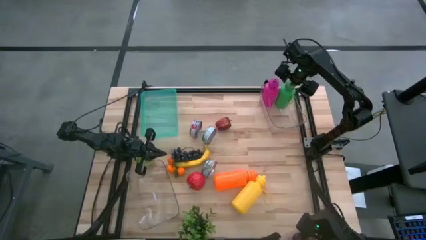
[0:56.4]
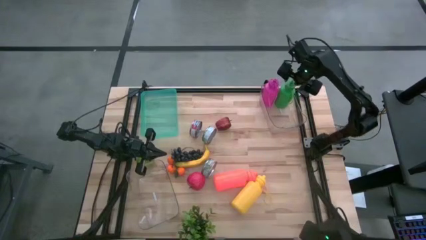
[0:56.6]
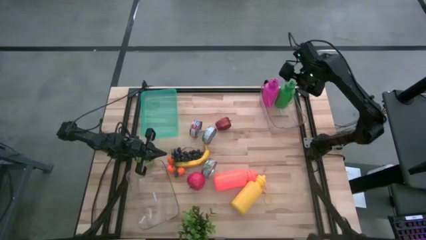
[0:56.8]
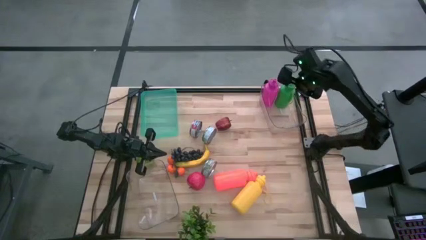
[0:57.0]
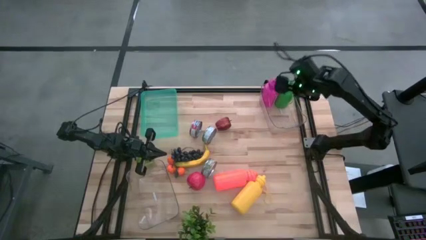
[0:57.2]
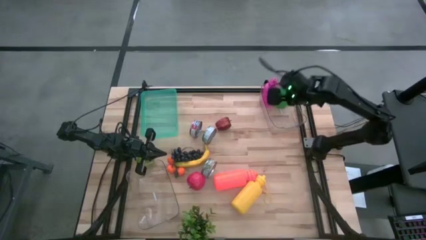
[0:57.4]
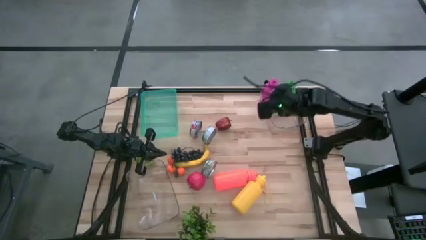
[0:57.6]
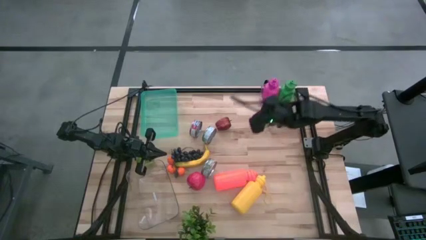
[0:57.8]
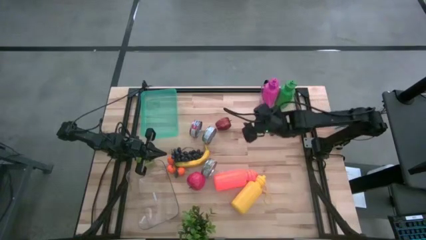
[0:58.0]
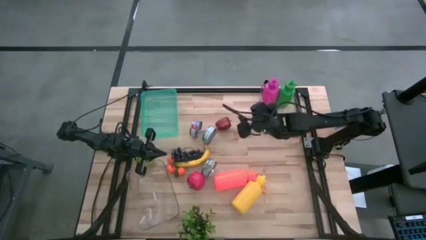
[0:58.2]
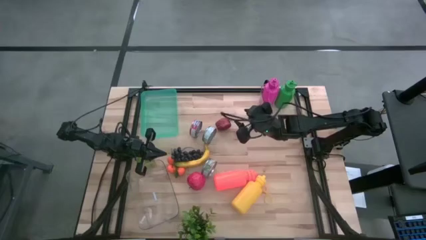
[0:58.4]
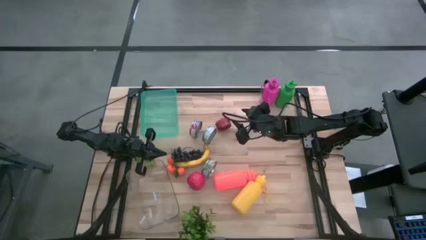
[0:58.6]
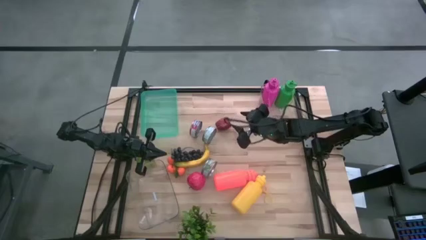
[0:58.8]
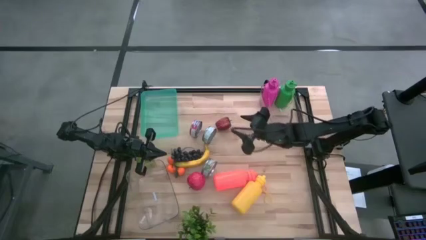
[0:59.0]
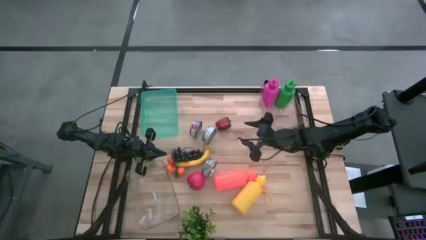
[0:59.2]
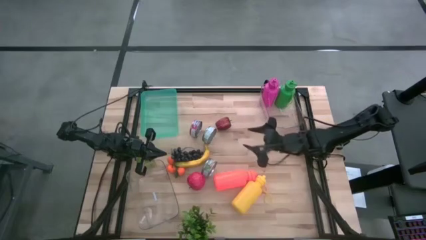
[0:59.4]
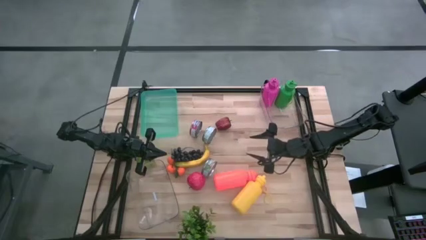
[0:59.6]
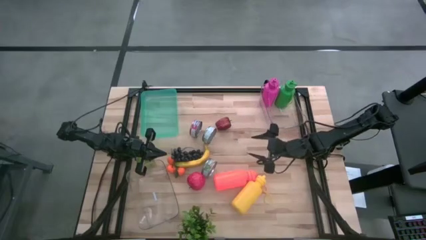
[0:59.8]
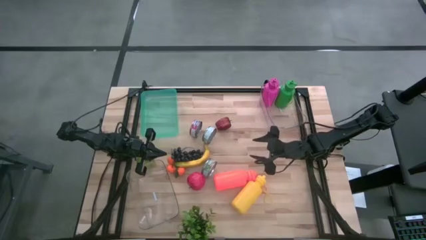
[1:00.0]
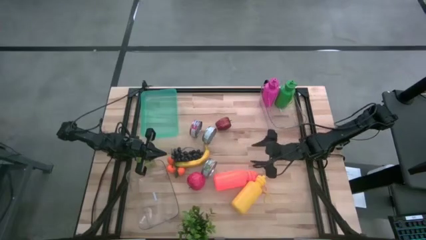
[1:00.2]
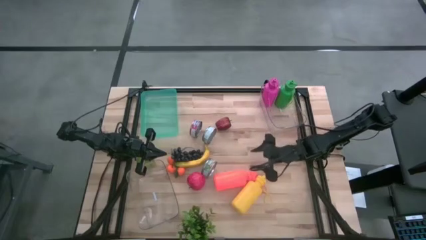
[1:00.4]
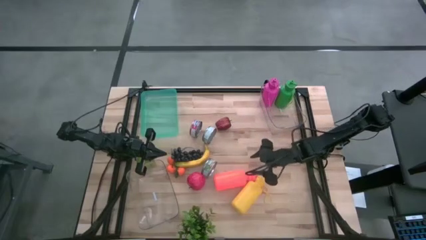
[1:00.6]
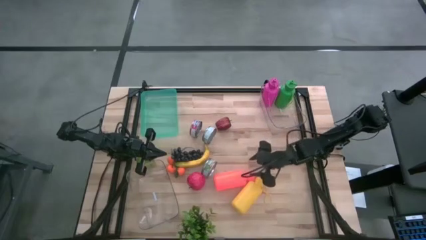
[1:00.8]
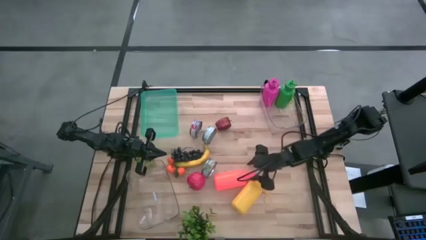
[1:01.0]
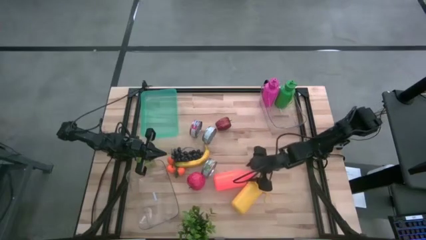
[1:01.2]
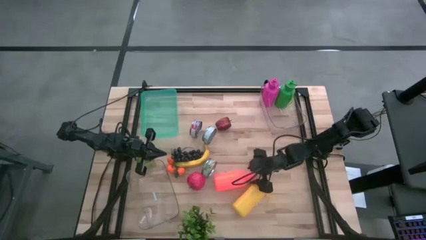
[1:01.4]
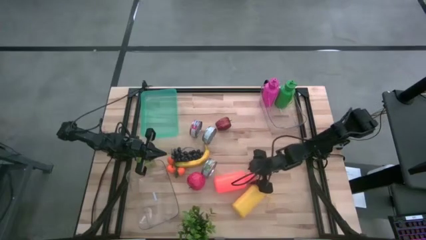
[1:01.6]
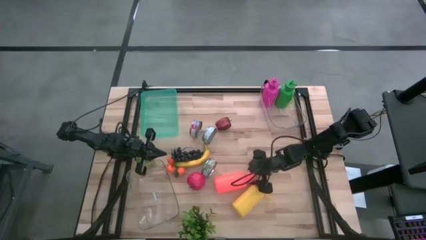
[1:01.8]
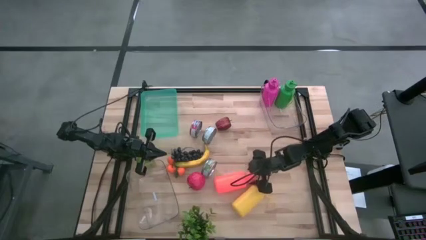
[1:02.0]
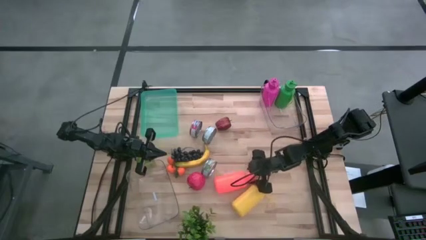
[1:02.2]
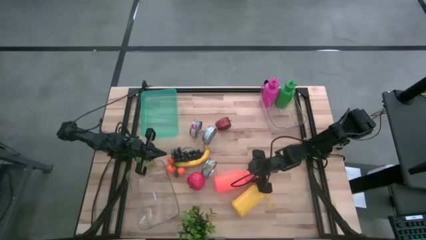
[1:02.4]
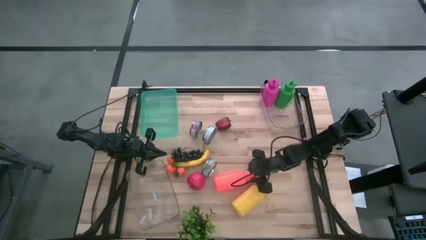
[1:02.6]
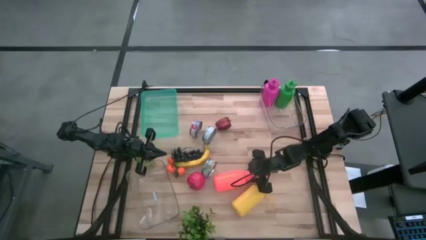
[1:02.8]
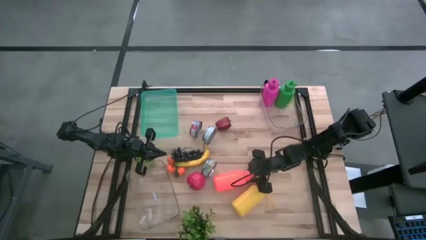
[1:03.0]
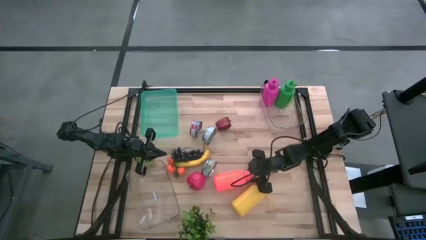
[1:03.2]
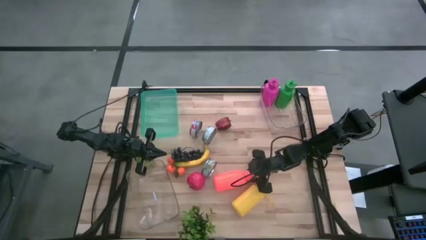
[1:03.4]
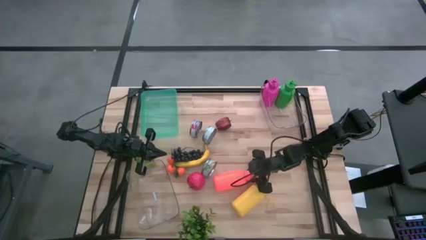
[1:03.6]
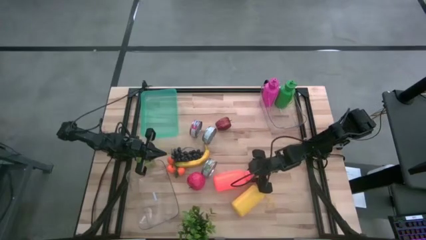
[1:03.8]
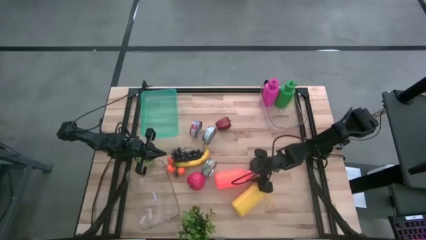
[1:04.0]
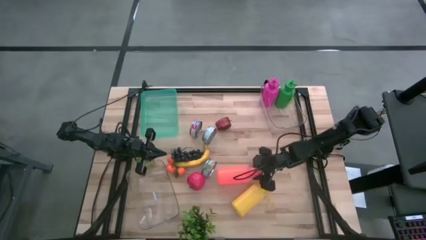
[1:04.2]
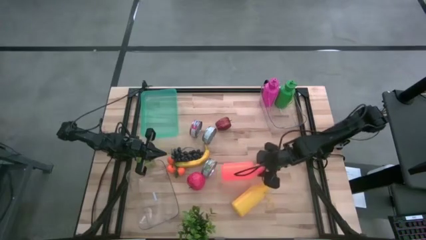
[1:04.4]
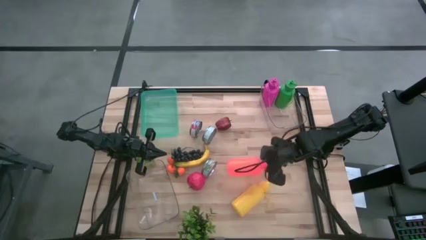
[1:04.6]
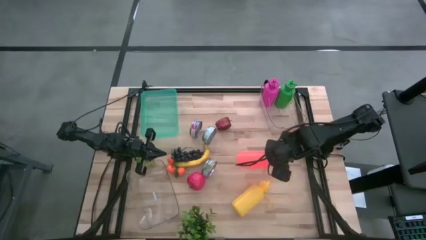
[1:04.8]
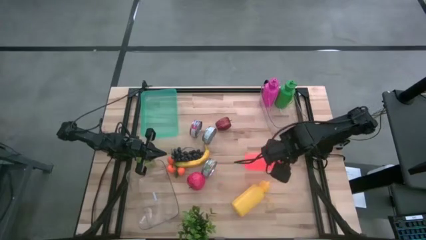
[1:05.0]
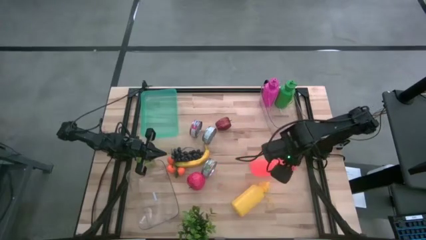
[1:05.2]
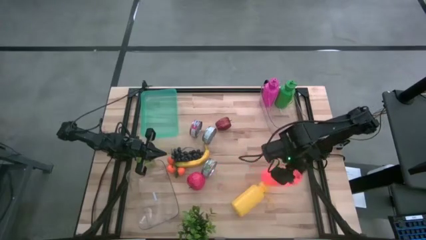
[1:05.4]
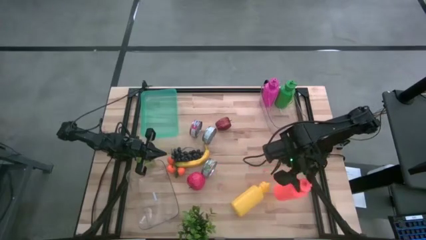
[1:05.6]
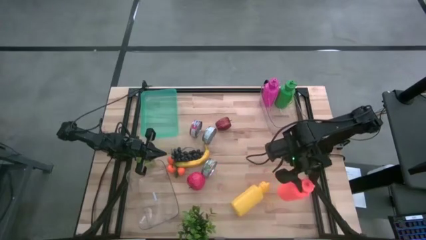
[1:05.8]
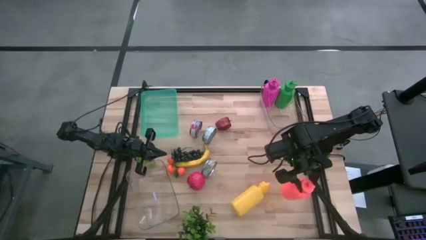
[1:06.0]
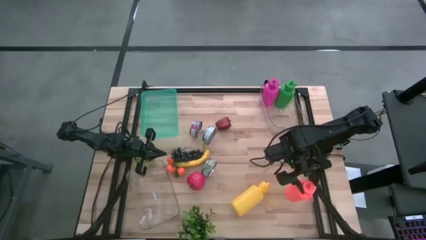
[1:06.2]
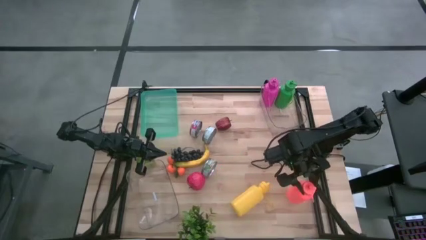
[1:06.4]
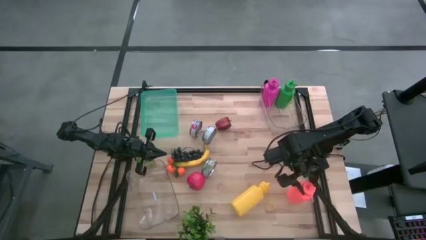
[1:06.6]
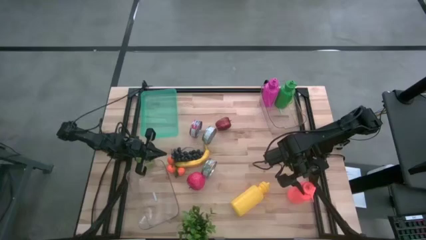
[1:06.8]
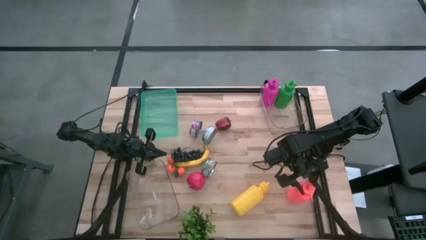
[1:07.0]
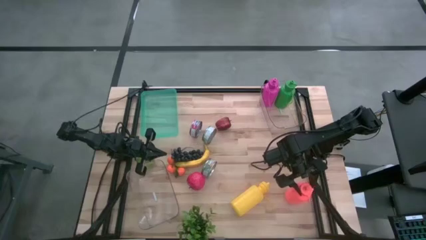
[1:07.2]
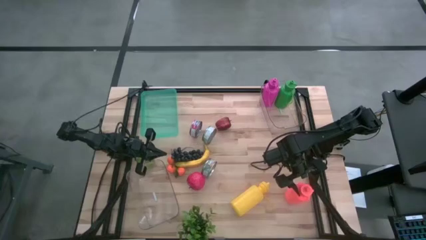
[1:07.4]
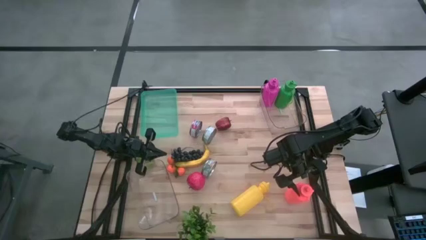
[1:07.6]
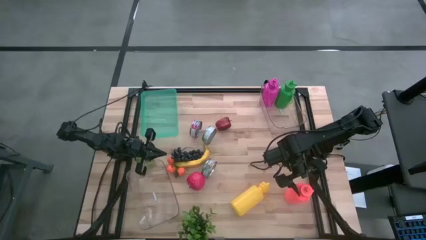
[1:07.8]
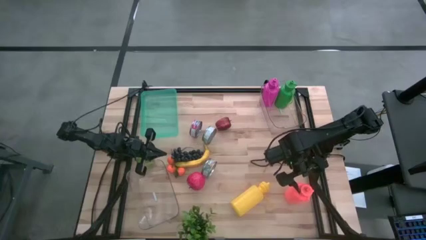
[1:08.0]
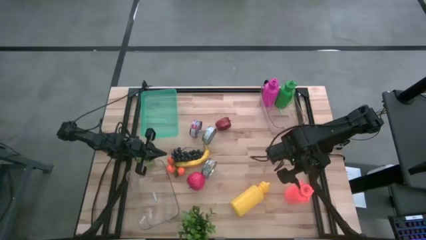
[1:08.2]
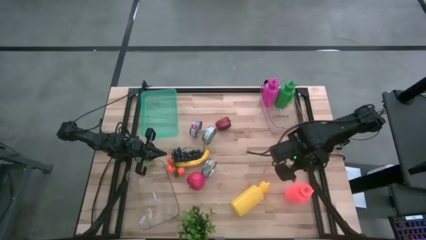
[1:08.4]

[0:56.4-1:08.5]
Task: Pick & Place Food Item
Put the orange tumbler bottle into the top right transparent bin
